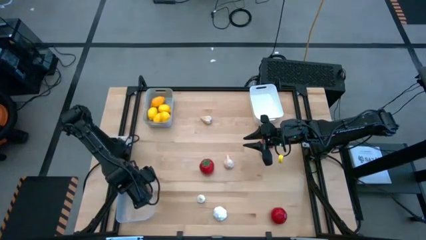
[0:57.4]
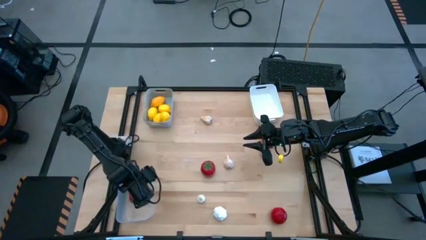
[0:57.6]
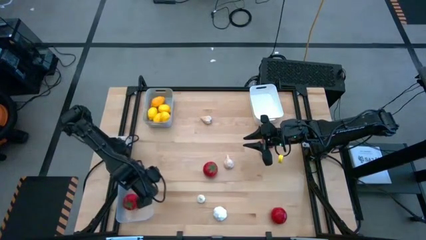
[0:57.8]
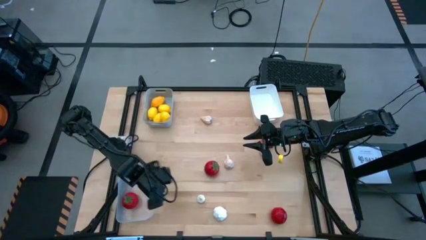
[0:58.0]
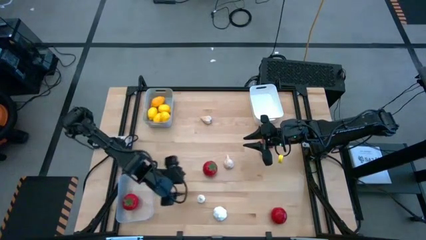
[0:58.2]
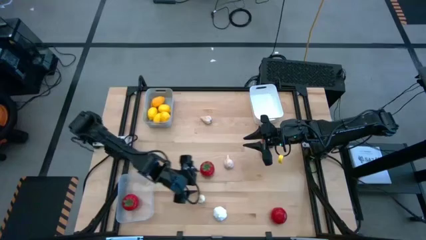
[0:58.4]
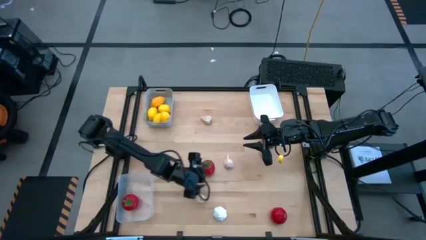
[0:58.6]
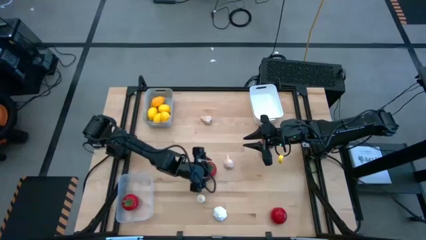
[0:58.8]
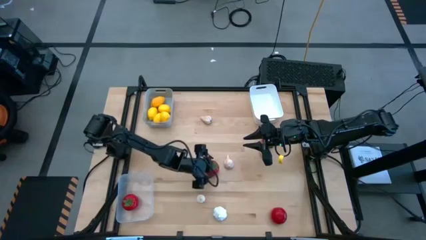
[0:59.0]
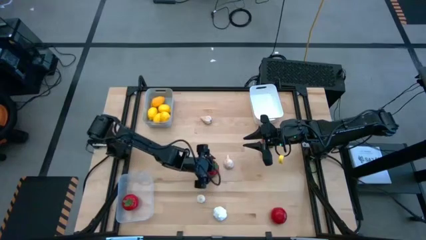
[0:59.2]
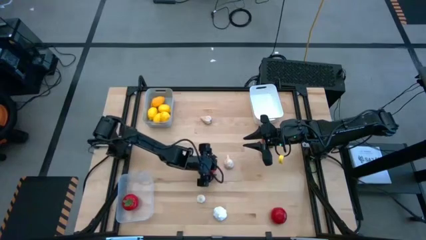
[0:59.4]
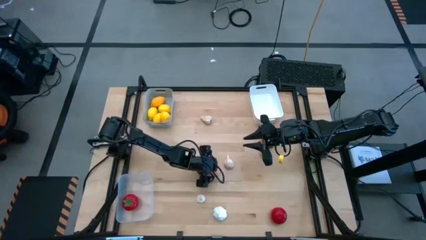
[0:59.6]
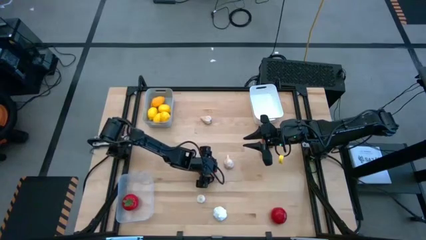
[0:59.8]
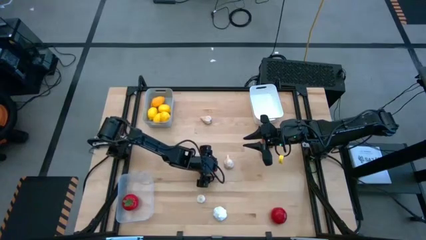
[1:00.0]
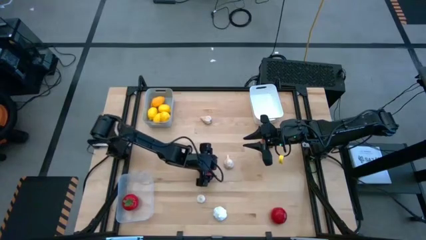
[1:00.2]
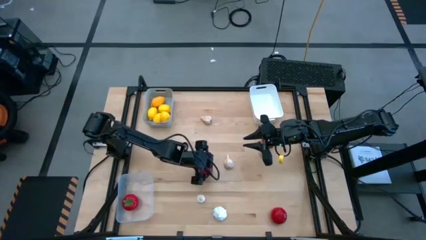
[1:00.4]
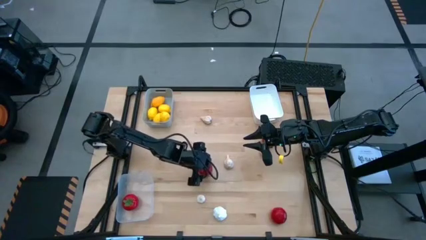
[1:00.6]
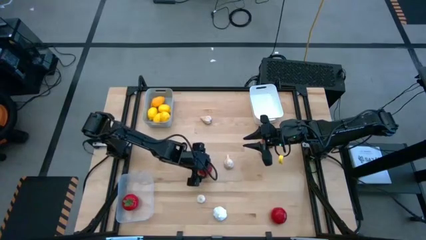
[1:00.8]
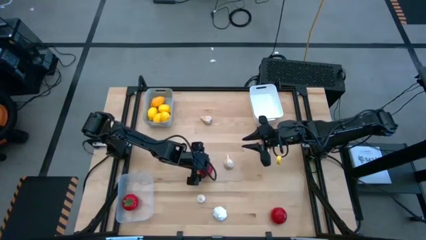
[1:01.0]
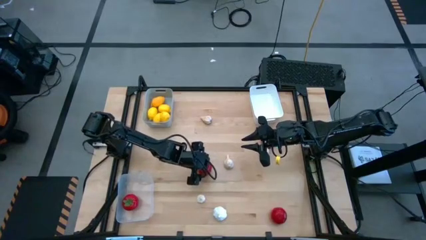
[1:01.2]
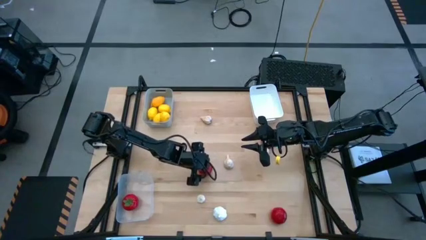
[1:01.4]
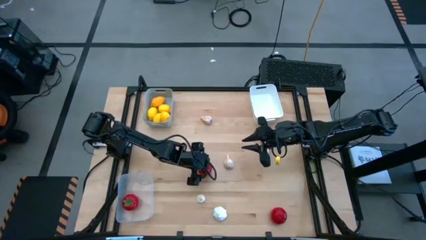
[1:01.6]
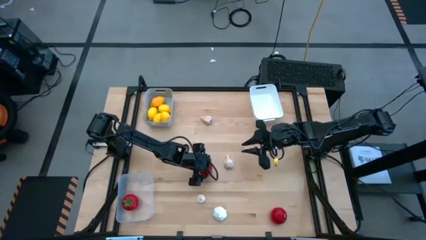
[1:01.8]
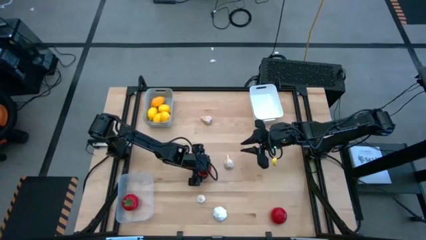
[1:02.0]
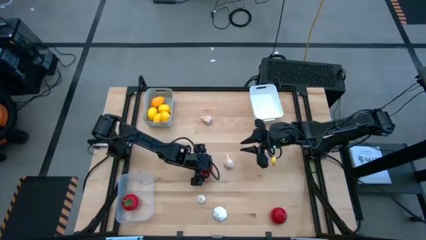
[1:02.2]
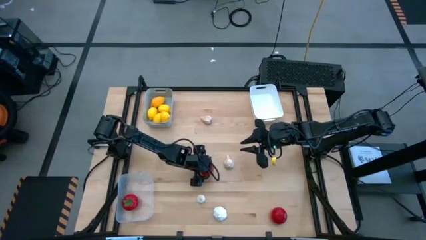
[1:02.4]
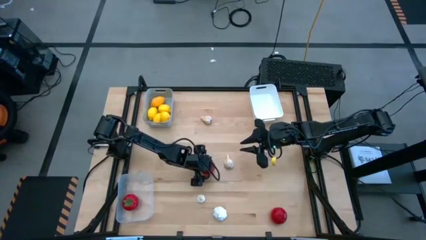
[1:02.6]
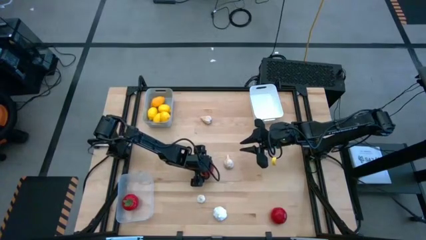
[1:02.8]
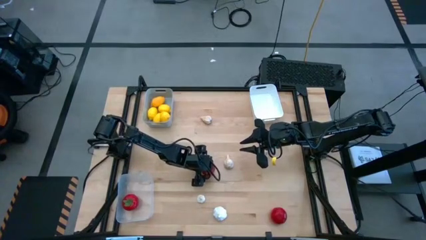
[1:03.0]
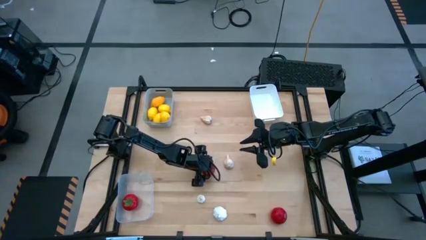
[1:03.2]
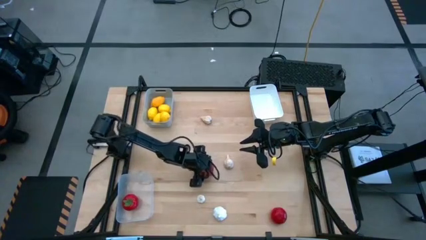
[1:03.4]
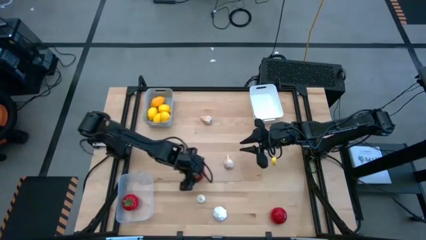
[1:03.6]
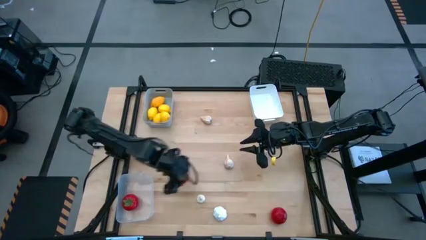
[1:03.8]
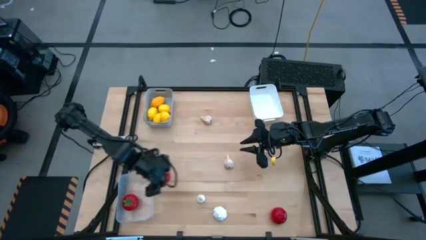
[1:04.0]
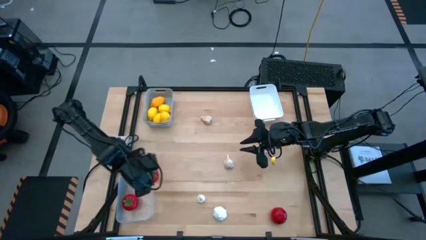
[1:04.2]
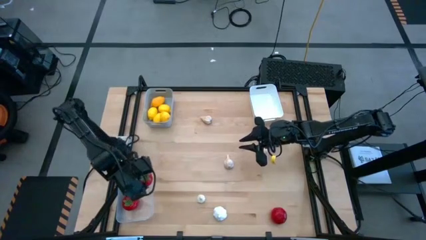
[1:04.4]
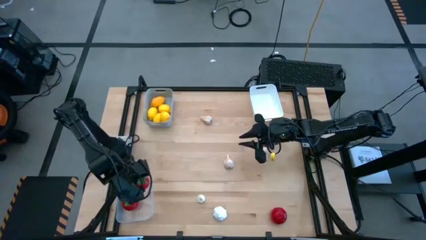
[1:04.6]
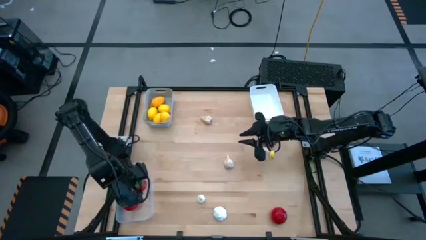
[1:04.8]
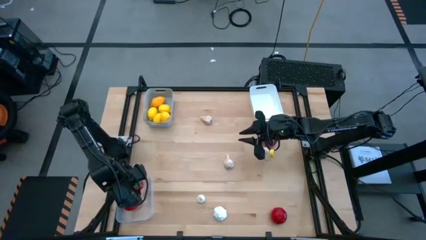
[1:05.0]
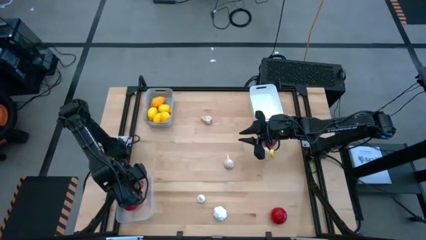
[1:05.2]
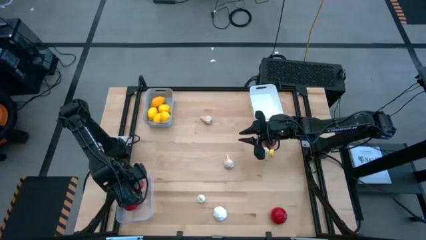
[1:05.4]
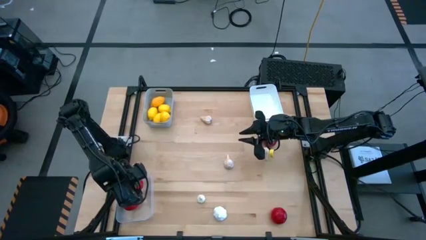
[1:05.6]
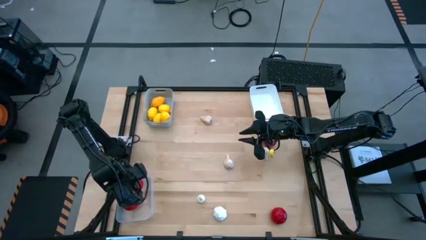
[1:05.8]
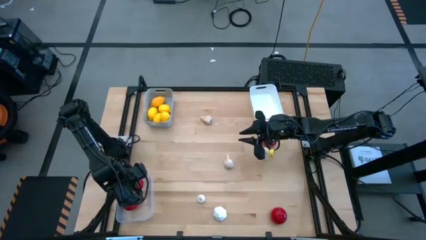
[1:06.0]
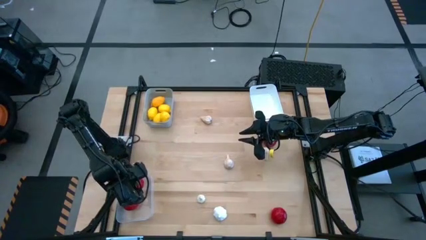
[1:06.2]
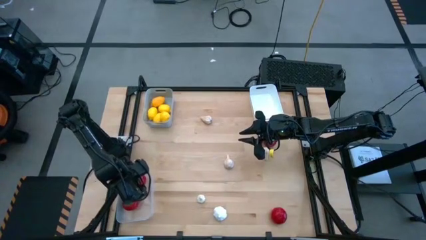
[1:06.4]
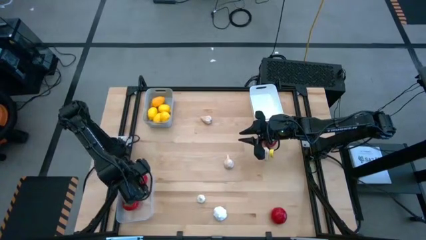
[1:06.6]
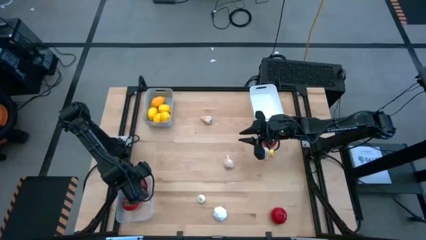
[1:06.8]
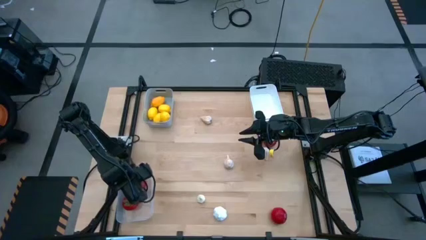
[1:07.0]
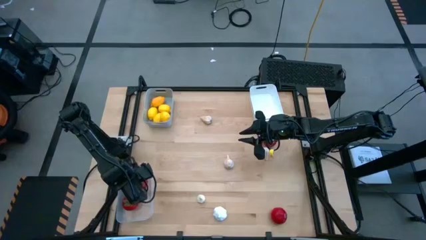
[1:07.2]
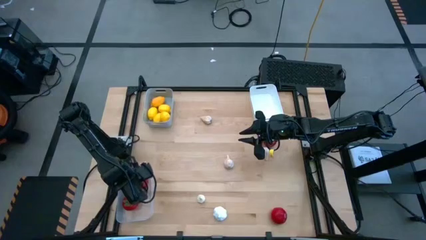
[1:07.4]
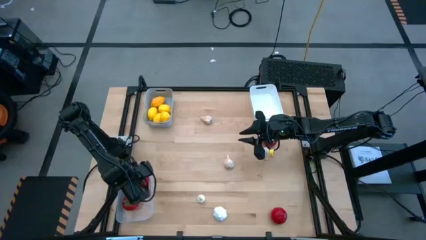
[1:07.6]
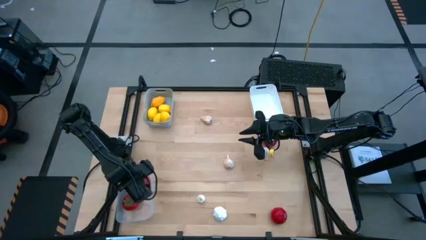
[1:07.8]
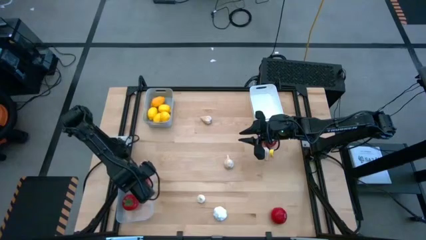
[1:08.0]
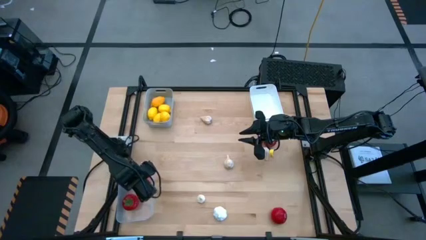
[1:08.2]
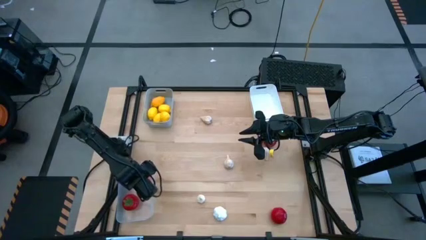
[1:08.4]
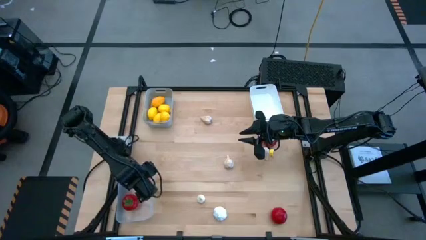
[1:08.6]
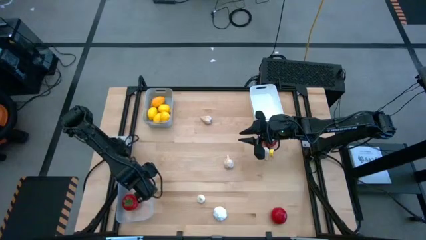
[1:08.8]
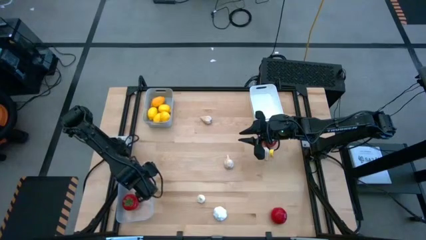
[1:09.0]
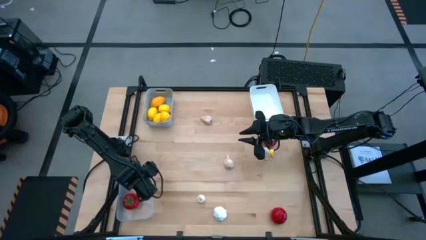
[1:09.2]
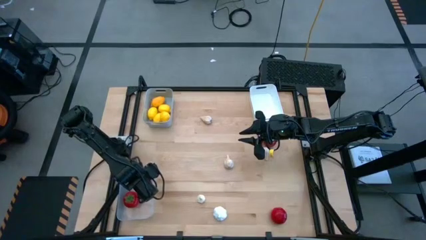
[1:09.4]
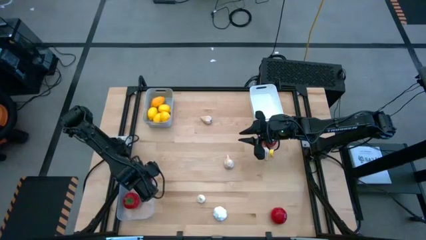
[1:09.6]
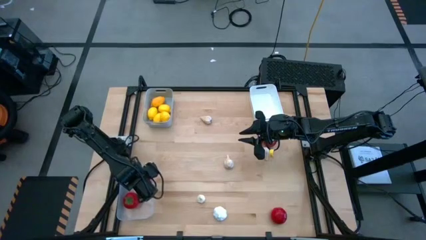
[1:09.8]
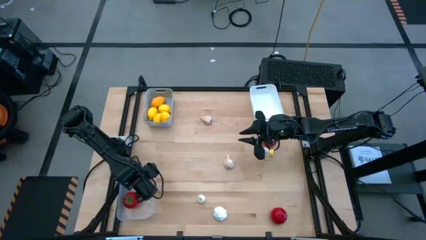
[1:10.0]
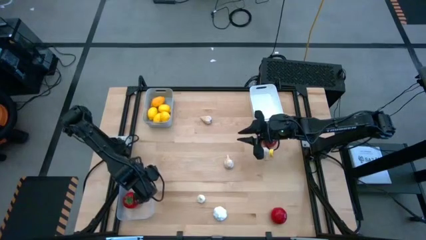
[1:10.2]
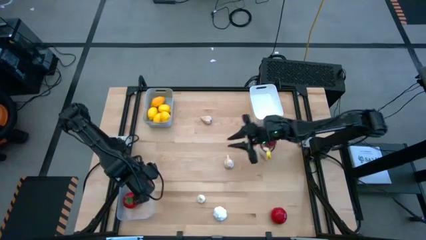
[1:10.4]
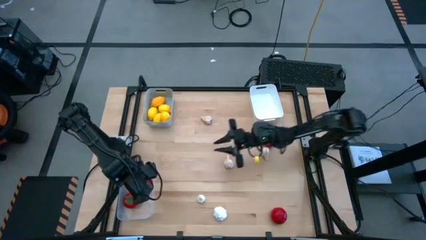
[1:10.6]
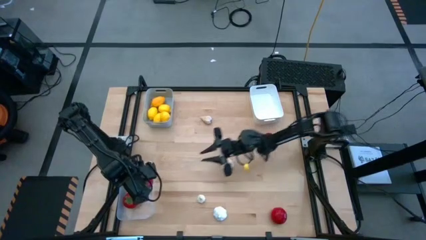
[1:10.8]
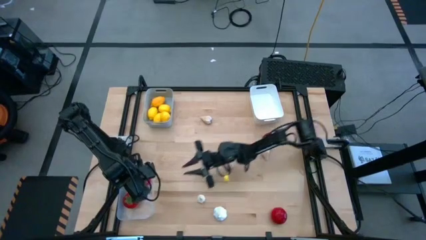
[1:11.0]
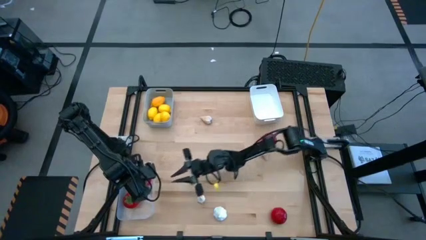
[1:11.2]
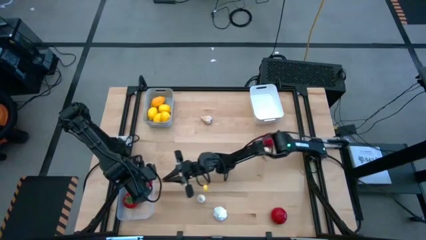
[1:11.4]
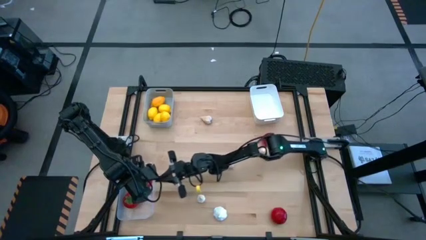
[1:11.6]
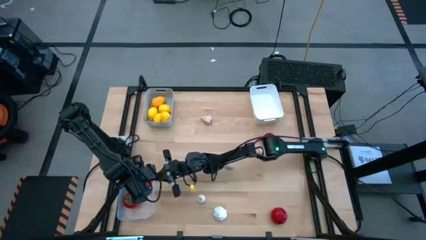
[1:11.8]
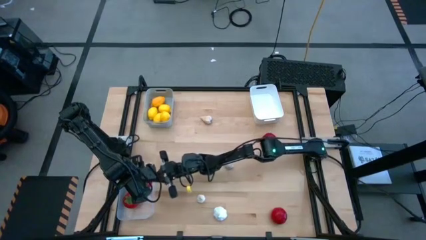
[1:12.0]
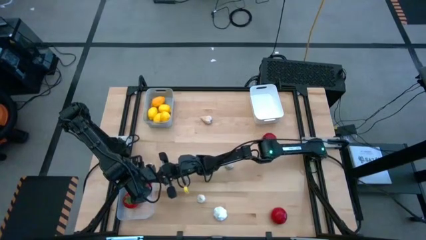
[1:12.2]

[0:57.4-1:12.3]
Task: Sort produce into baskets
Put the red tomato into the transparent bin
